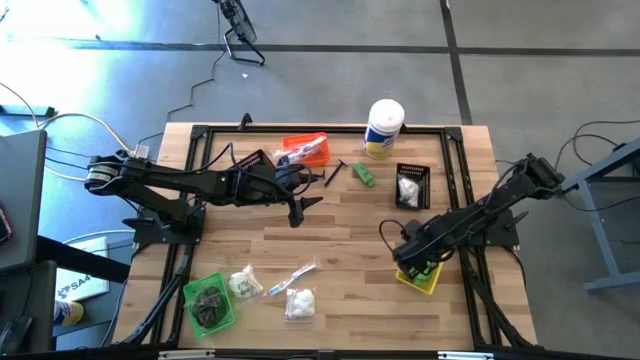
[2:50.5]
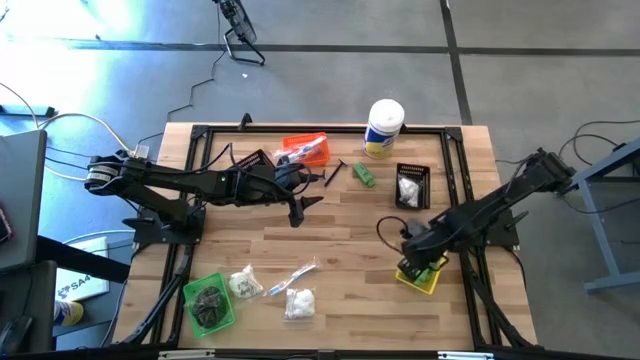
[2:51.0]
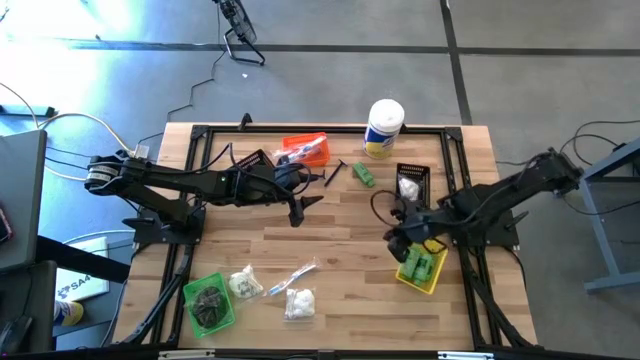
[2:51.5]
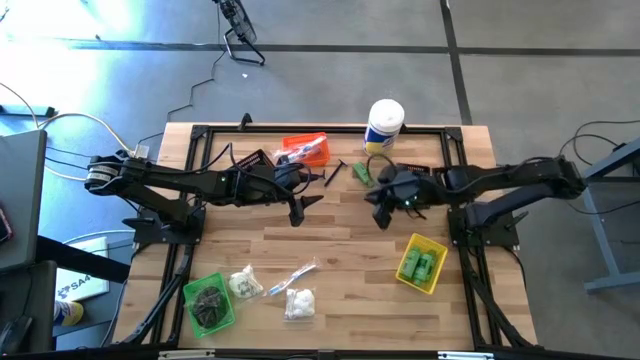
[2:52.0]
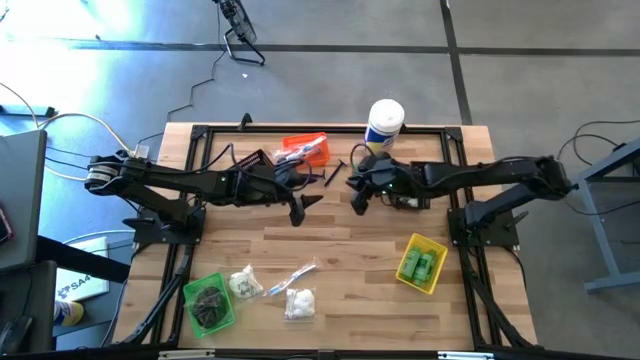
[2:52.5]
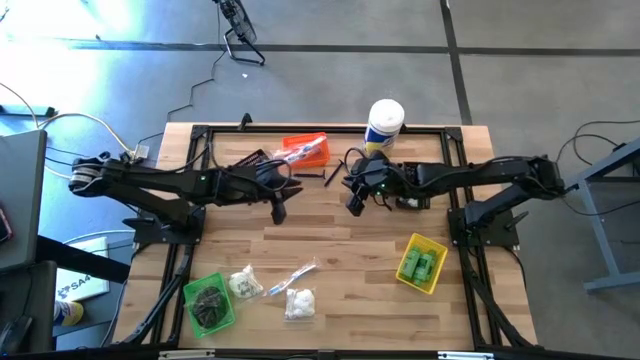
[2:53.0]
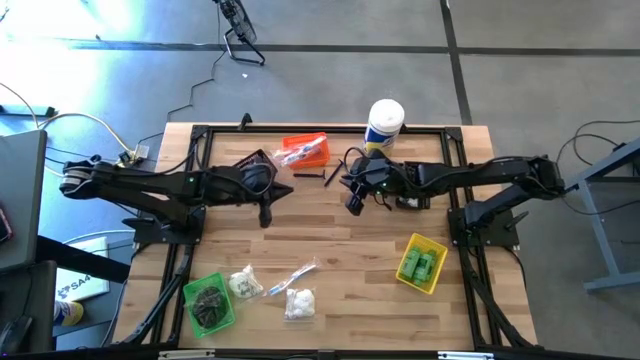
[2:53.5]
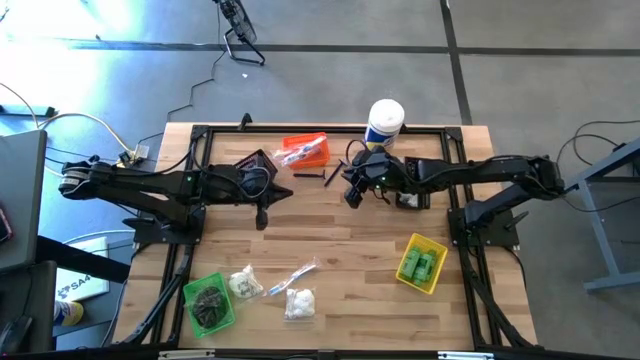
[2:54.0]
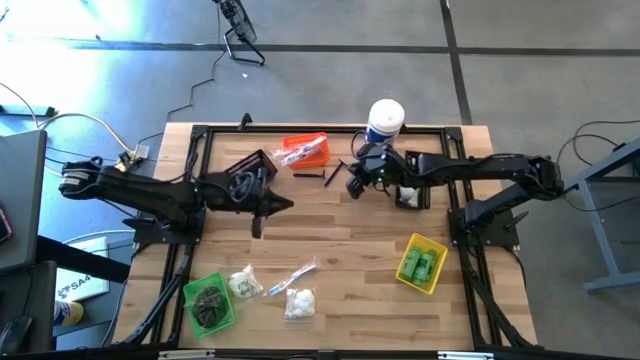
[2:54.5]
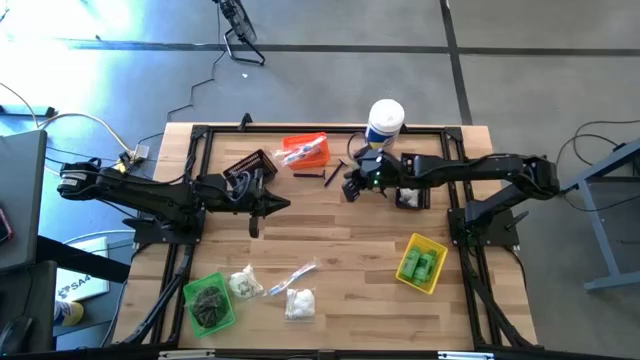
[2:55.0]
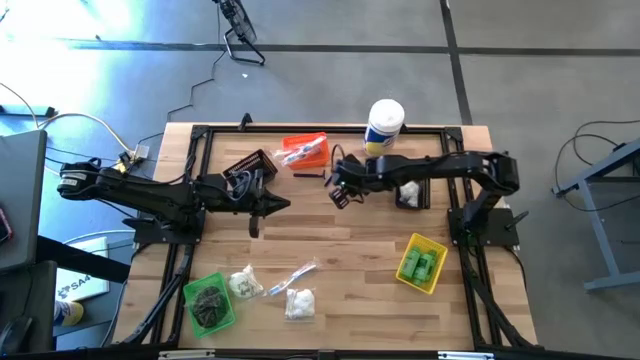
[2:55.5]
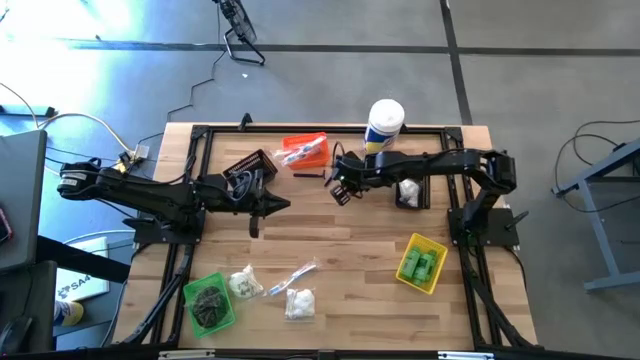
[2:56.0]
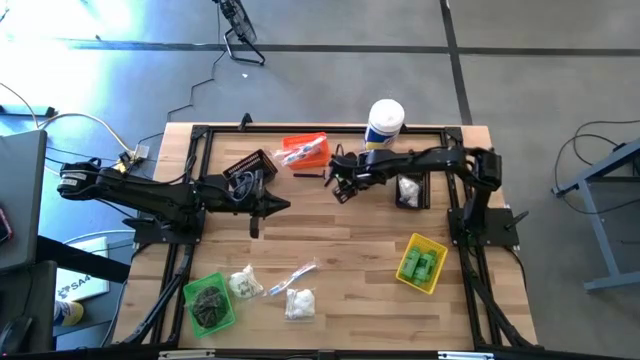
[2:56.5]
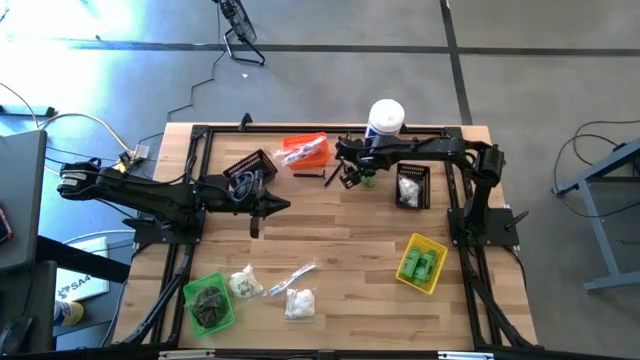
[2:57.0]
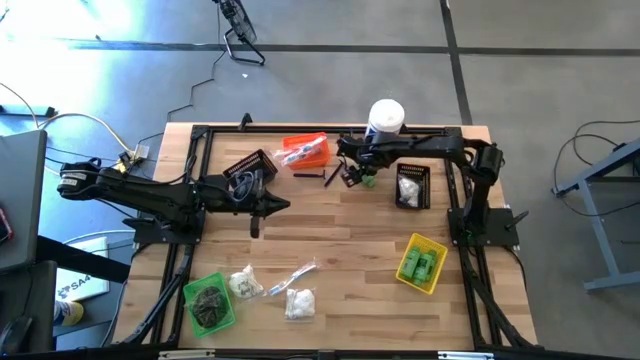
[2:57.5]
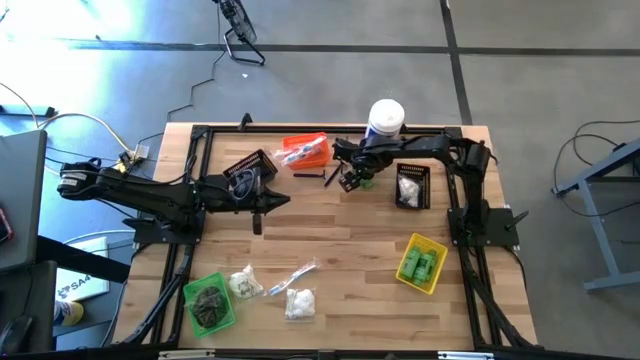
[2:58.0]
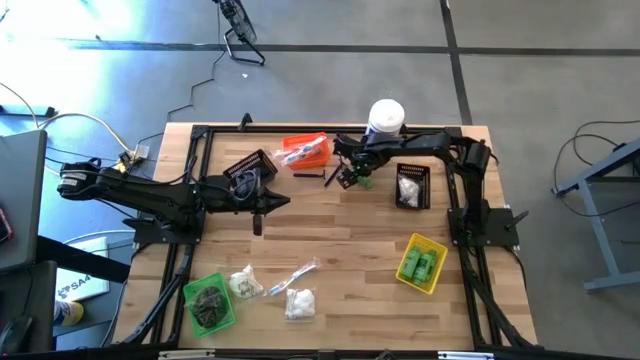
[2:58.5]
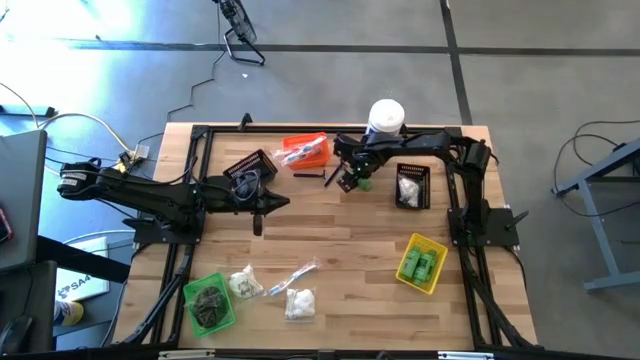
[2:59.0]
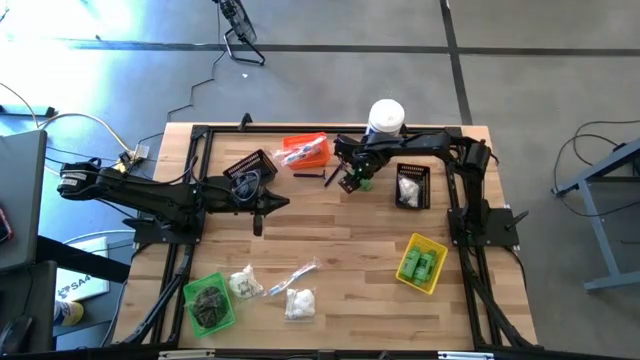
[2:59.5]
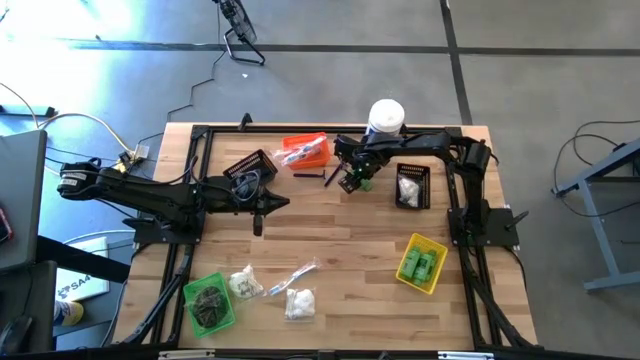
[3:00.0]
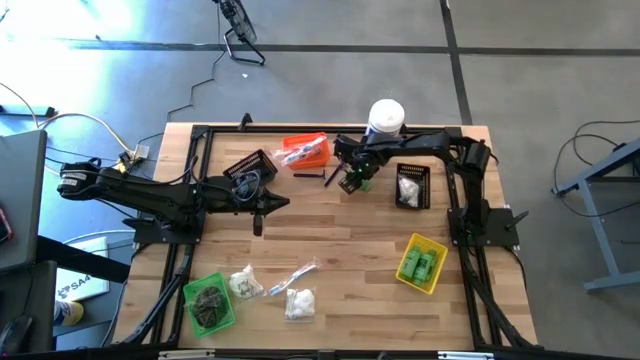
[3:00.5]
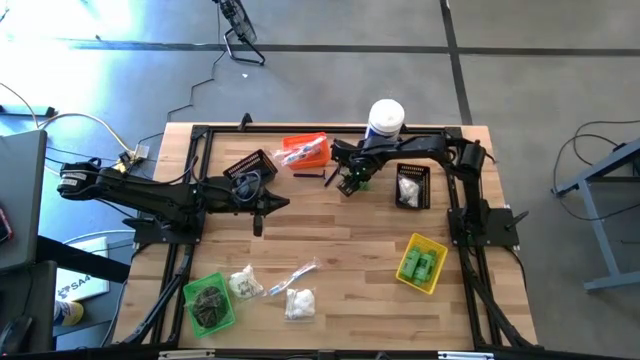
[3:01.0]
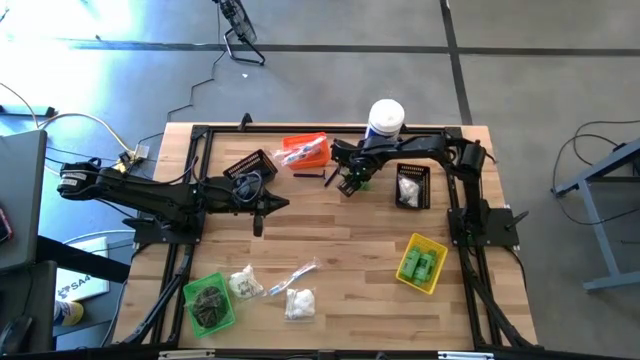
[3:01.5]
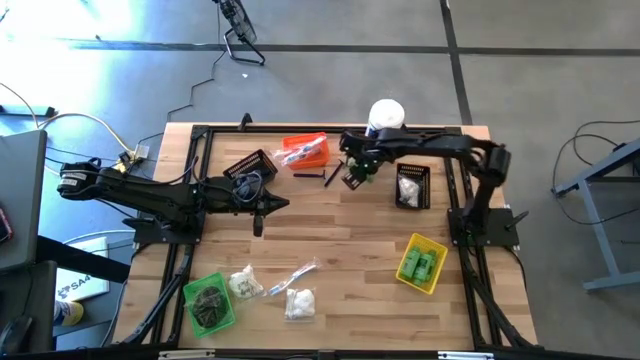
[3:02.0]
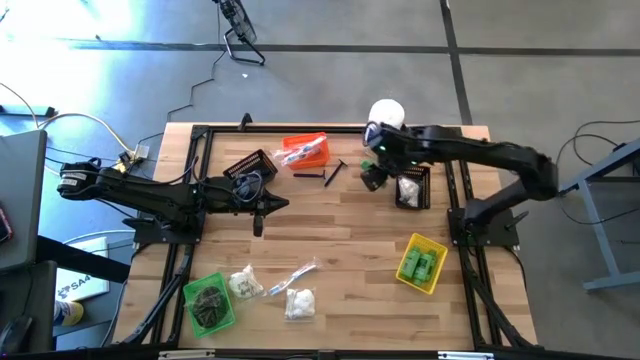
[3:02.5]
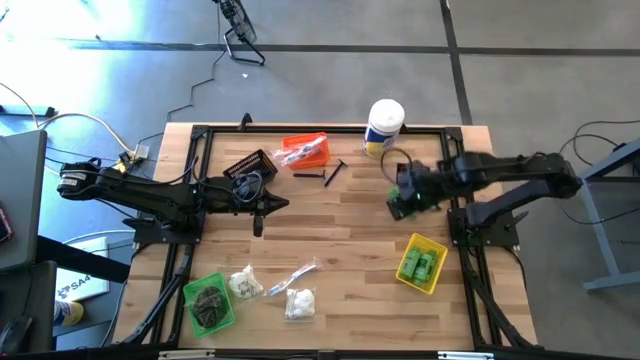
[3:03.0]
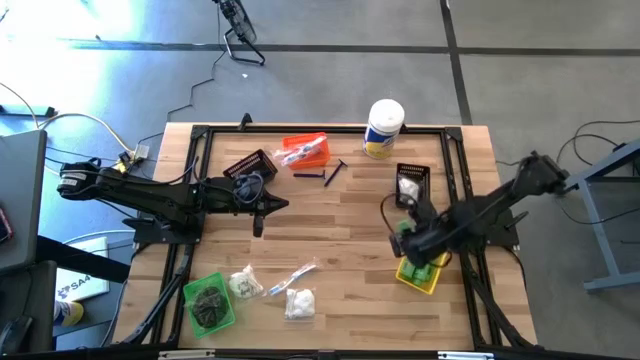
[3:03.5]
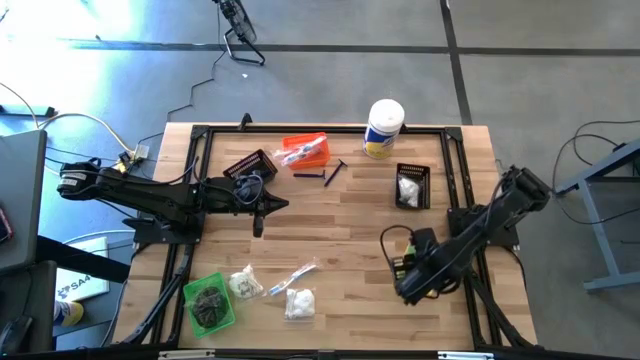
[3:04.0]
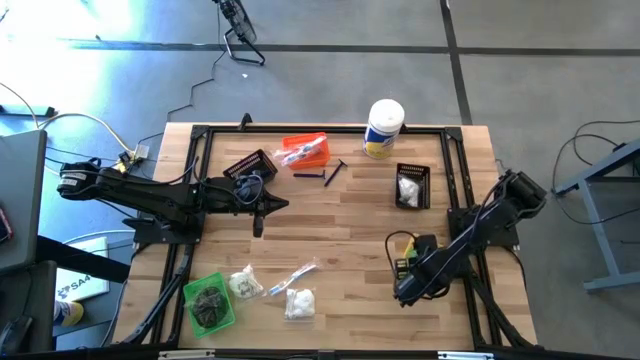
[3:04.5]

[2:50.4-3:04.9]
Task: Pick & Place Travel size toiletries
Put the green shampoo bottle into the yellow bin

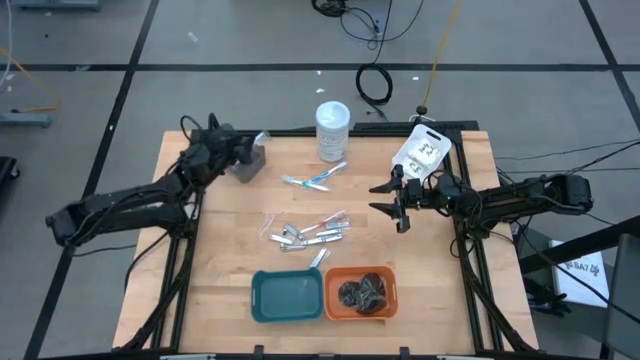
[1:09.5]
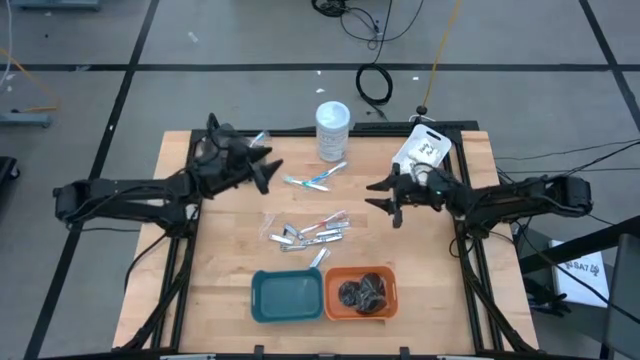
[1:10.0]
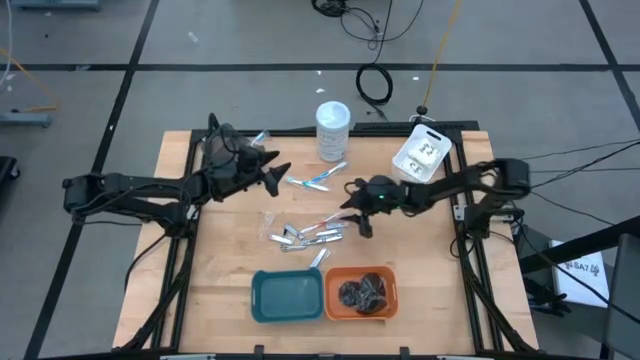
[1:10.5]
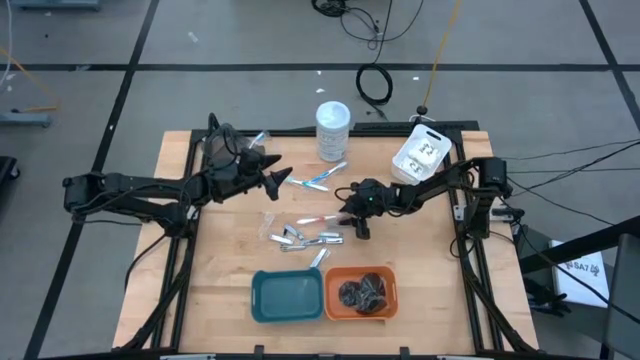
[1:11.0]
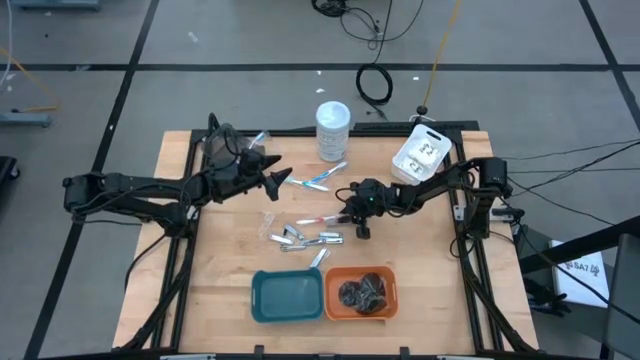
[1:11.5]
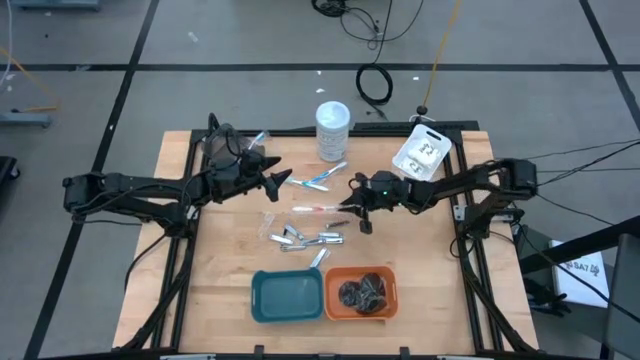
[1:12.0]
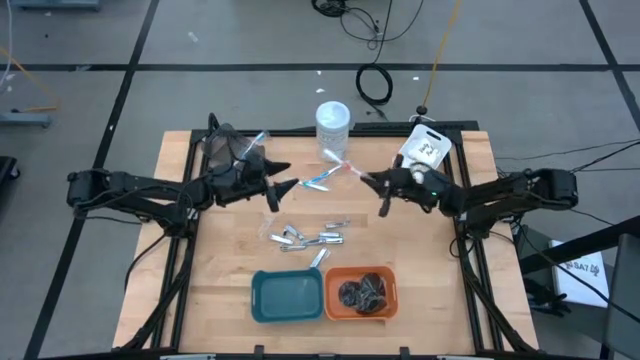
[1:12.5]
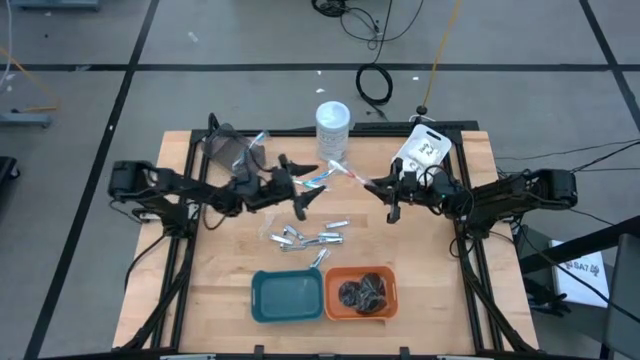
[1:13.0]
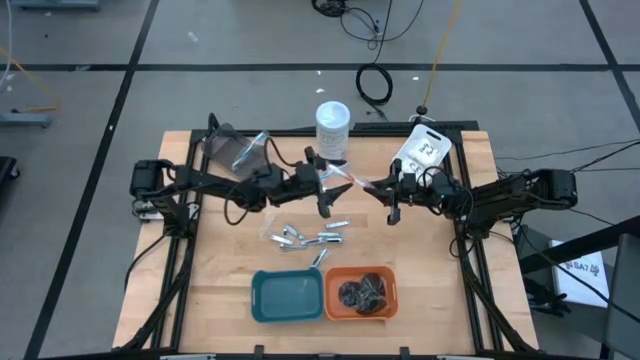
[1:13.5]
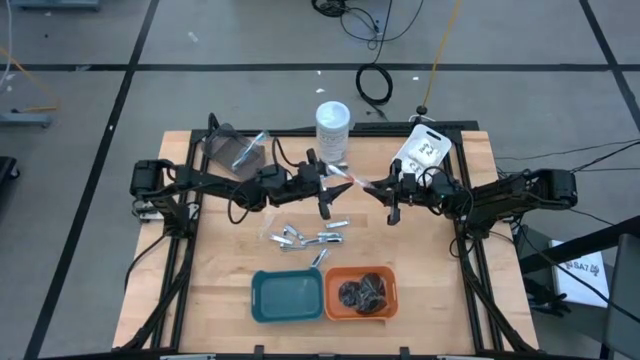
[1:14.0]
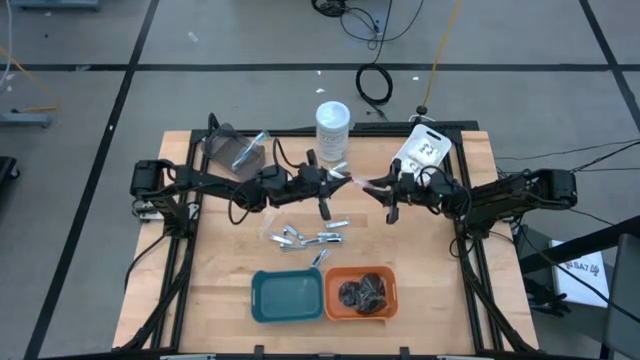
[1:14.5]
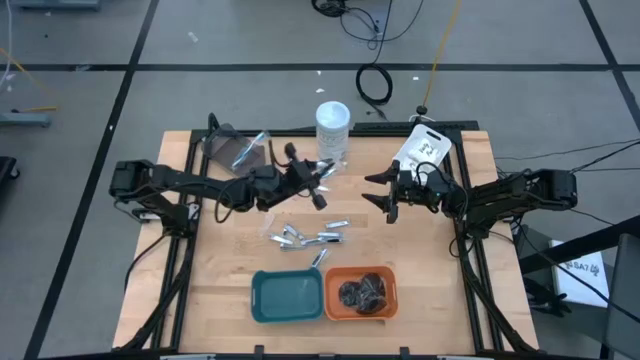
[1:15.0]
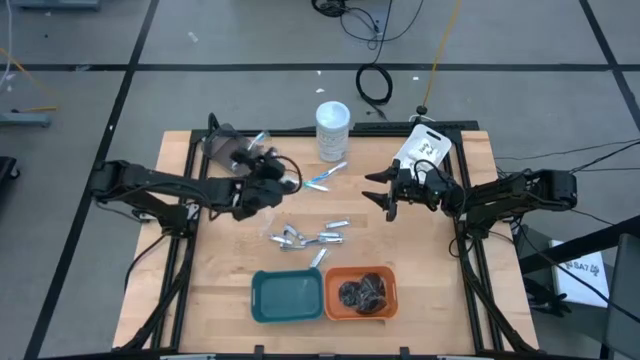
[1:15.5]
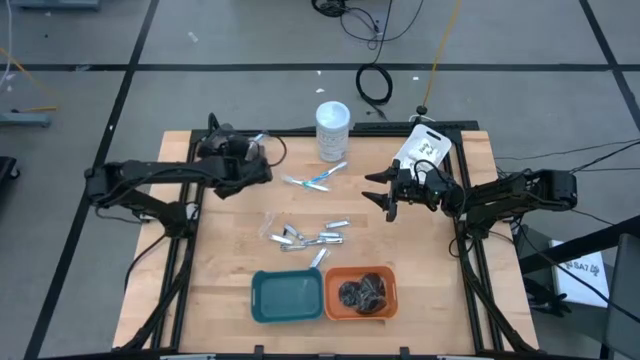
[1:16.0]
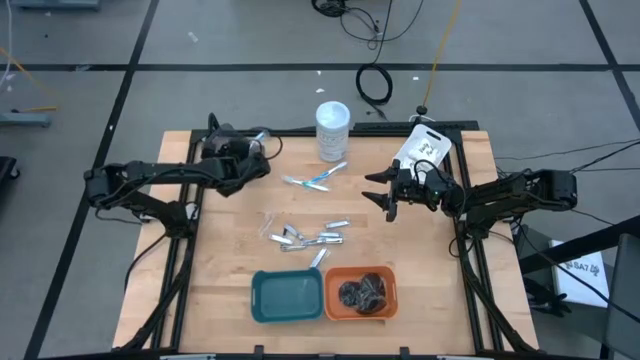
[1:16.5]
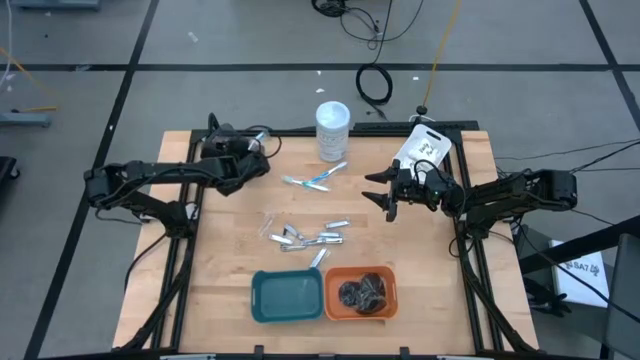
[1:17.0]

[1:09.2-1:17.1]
Task: Pick & Place Travel size toiletries
Put the orange toothbrush into the black bin
